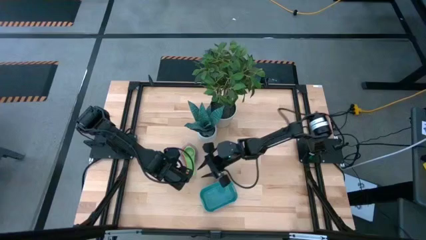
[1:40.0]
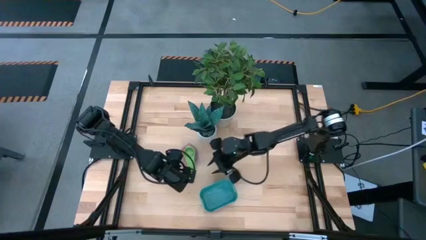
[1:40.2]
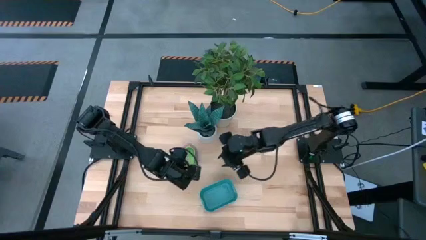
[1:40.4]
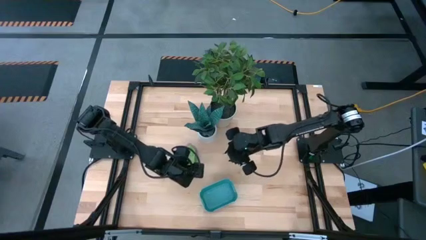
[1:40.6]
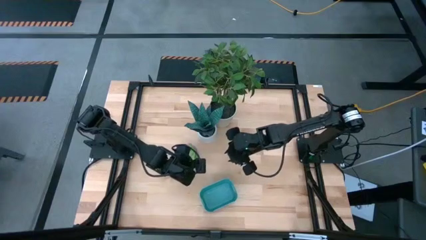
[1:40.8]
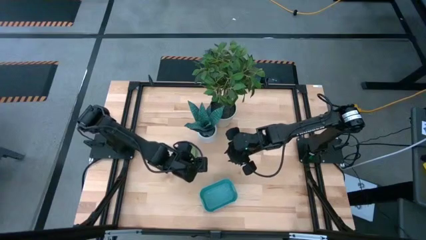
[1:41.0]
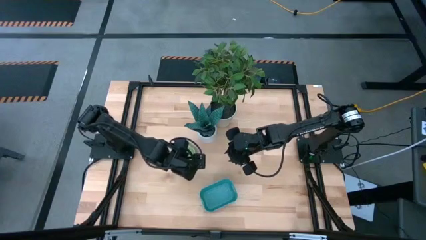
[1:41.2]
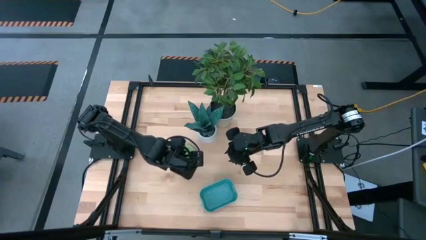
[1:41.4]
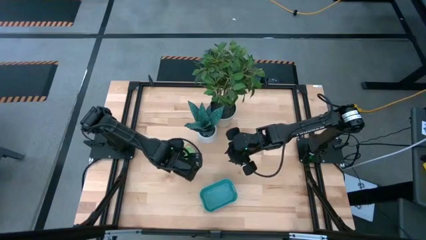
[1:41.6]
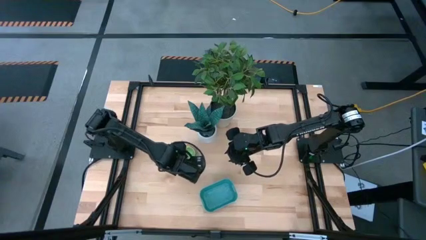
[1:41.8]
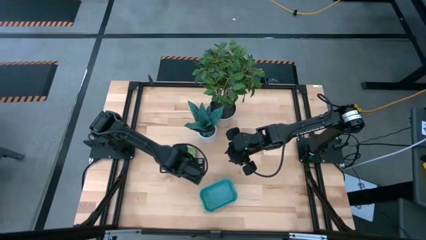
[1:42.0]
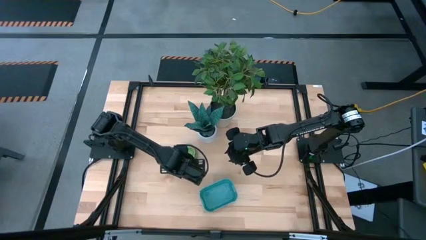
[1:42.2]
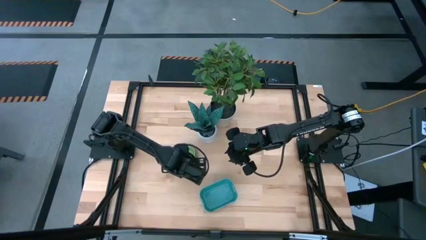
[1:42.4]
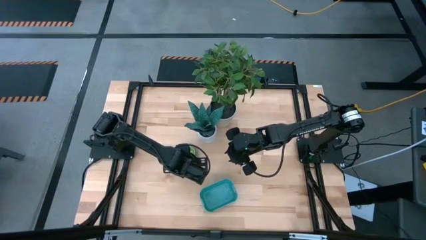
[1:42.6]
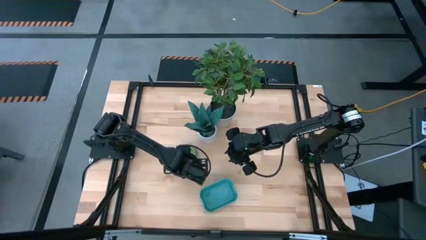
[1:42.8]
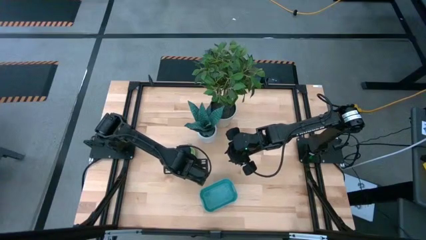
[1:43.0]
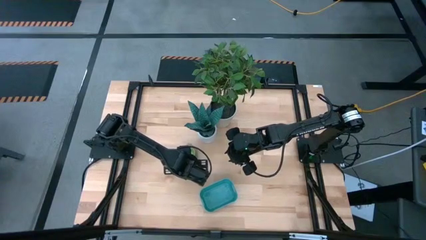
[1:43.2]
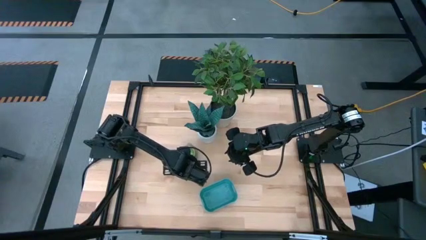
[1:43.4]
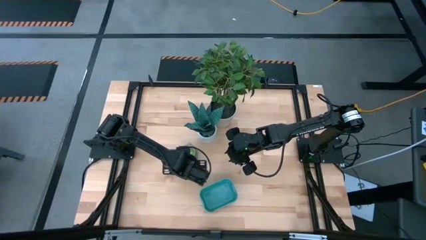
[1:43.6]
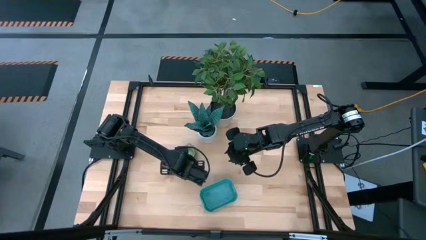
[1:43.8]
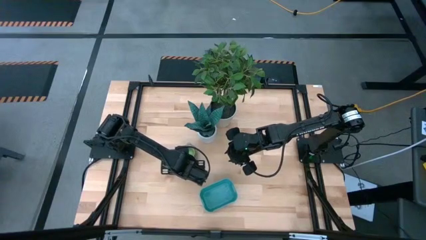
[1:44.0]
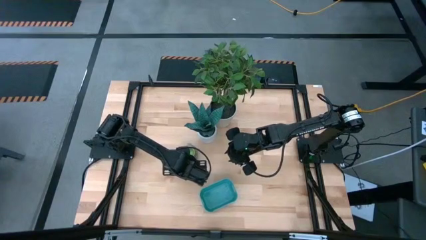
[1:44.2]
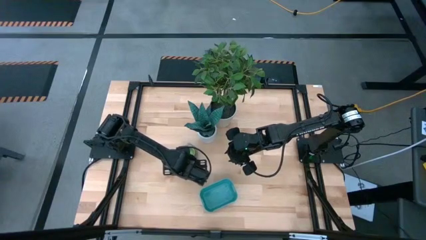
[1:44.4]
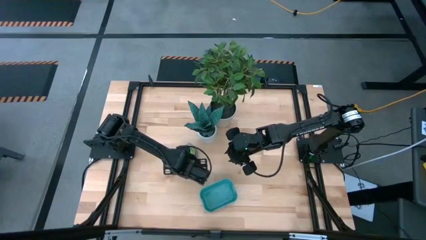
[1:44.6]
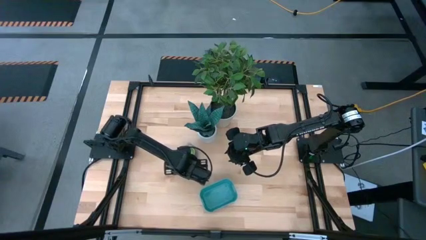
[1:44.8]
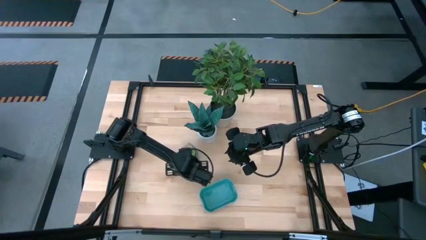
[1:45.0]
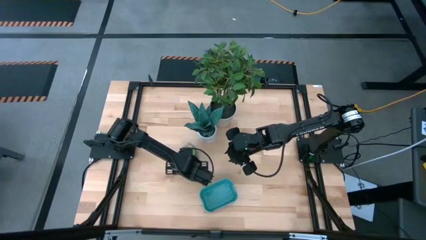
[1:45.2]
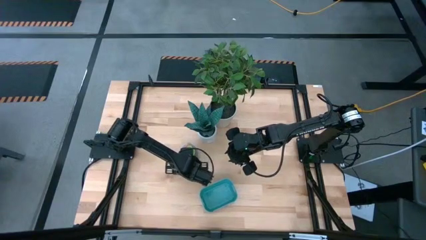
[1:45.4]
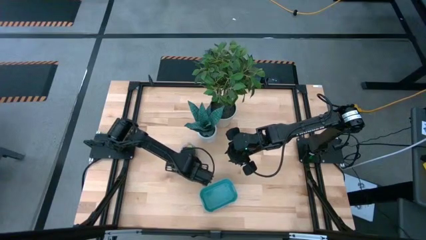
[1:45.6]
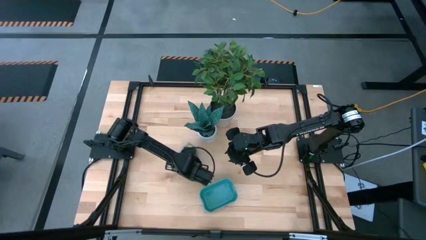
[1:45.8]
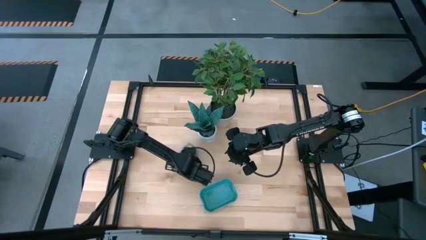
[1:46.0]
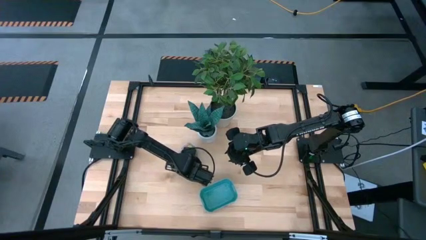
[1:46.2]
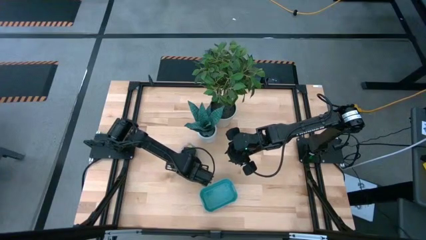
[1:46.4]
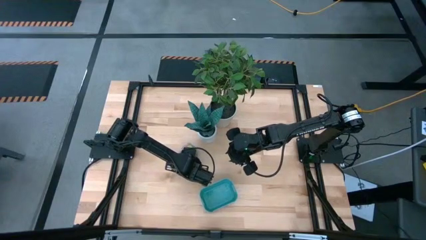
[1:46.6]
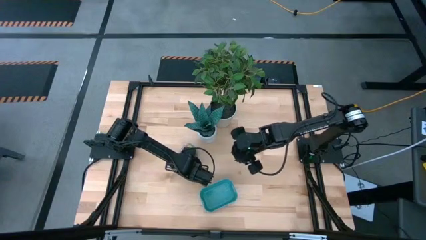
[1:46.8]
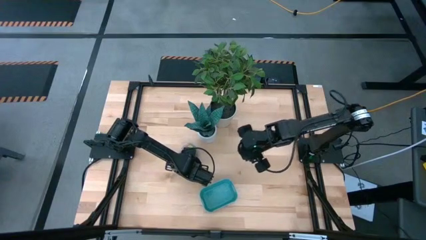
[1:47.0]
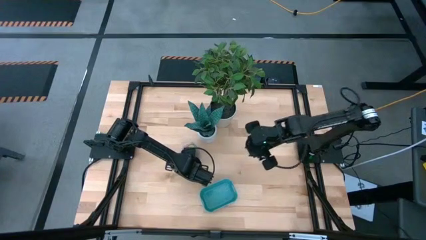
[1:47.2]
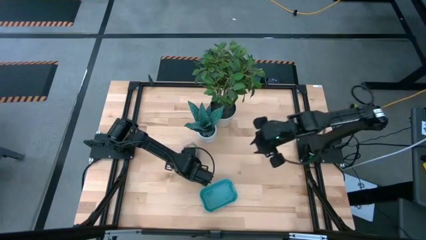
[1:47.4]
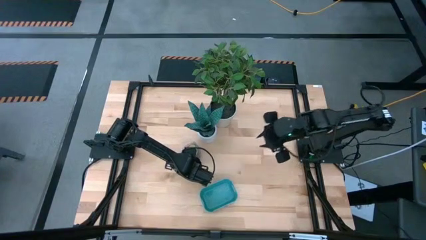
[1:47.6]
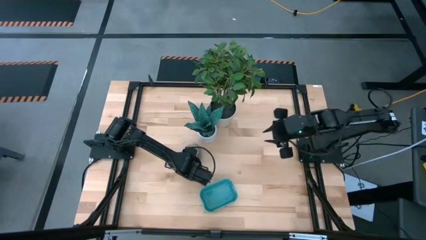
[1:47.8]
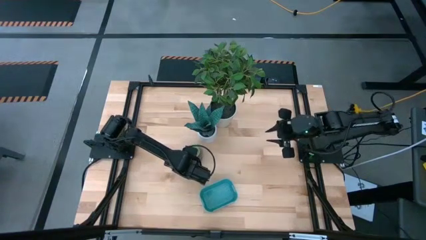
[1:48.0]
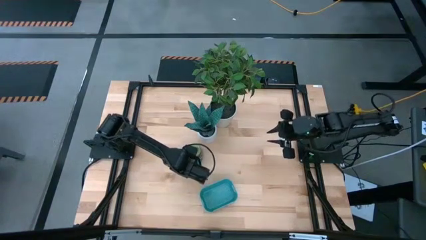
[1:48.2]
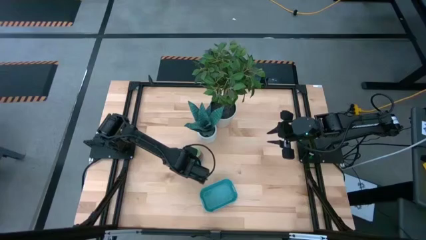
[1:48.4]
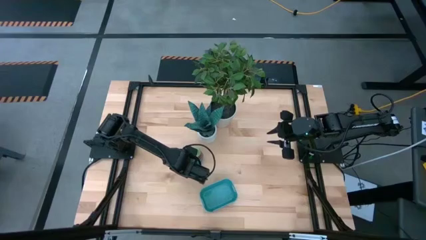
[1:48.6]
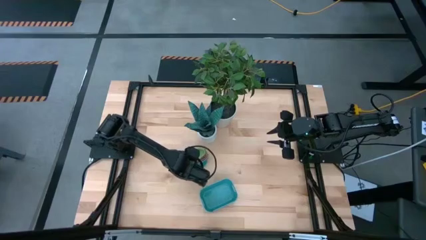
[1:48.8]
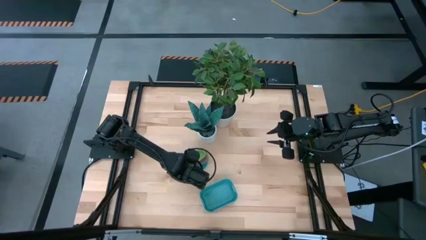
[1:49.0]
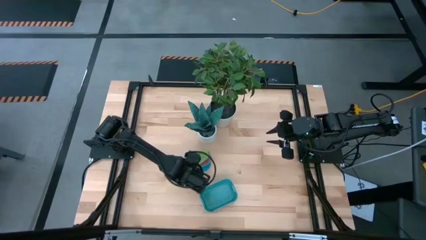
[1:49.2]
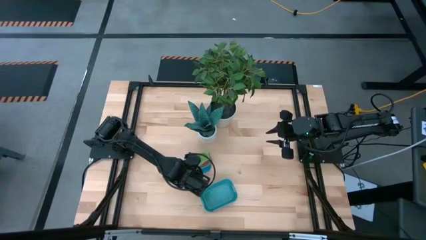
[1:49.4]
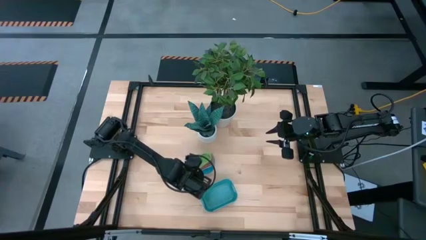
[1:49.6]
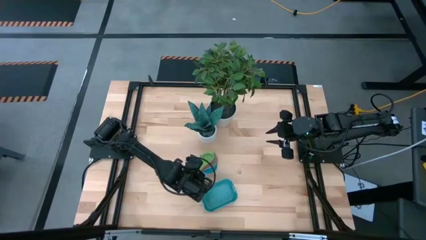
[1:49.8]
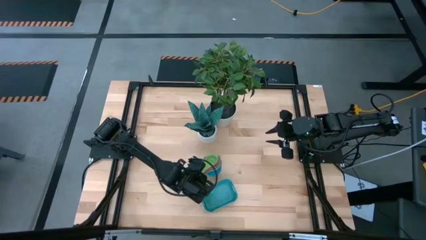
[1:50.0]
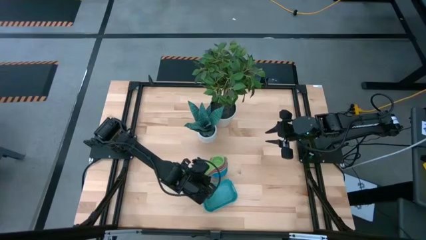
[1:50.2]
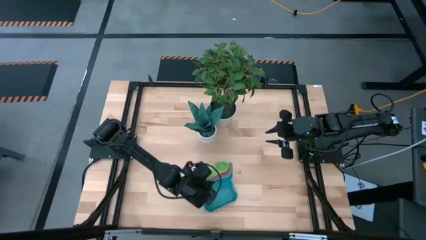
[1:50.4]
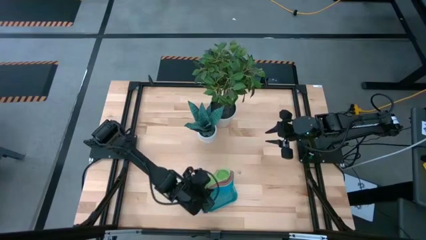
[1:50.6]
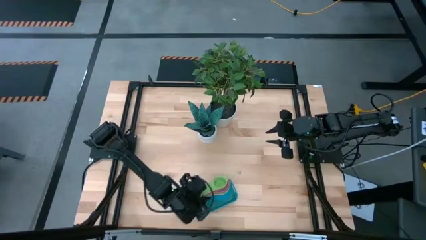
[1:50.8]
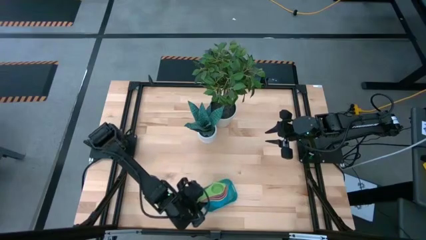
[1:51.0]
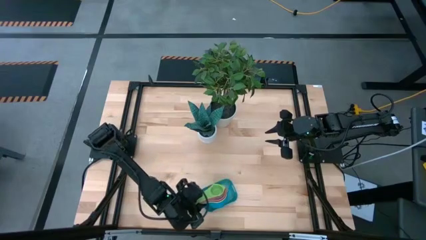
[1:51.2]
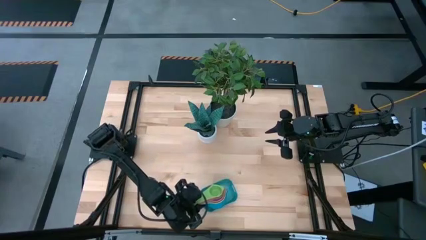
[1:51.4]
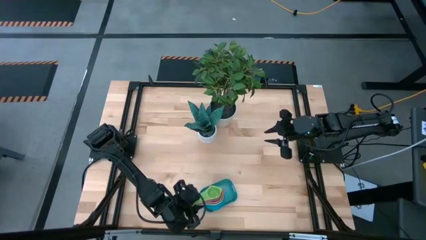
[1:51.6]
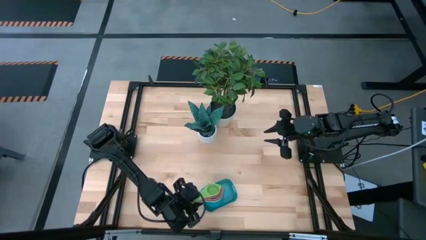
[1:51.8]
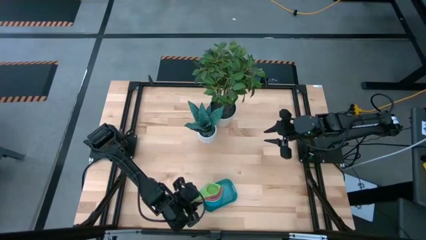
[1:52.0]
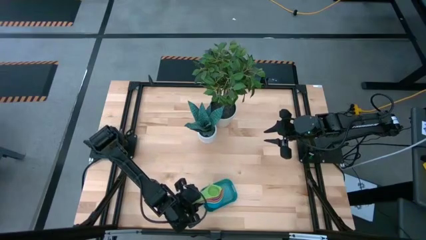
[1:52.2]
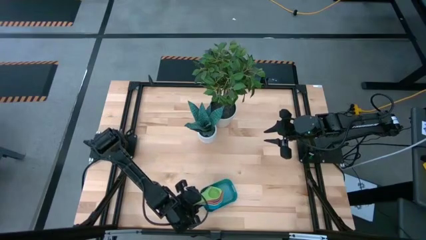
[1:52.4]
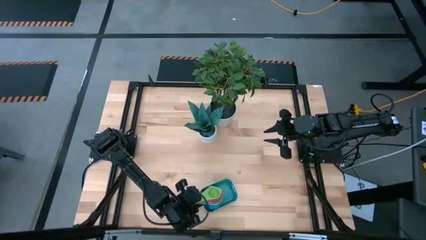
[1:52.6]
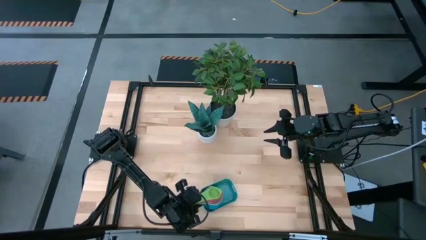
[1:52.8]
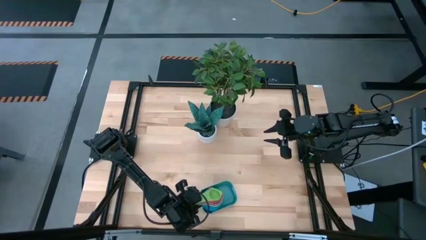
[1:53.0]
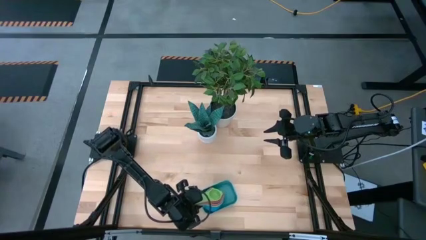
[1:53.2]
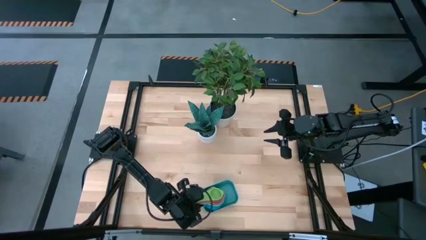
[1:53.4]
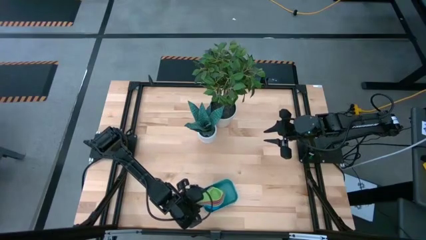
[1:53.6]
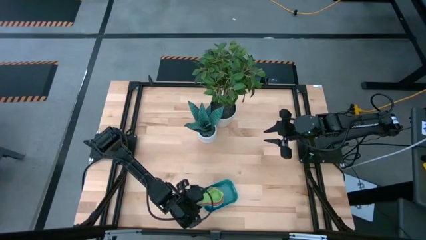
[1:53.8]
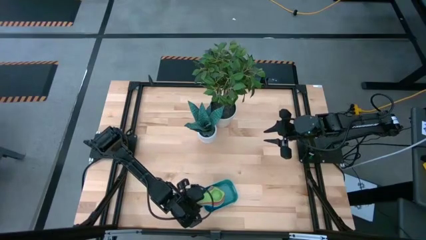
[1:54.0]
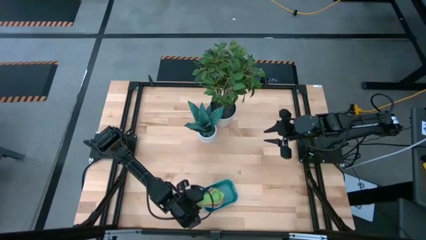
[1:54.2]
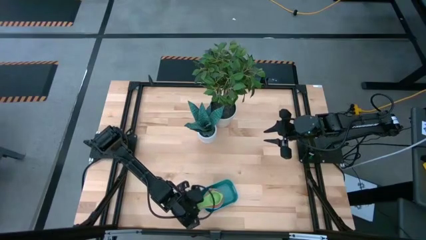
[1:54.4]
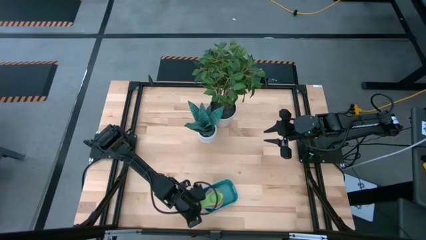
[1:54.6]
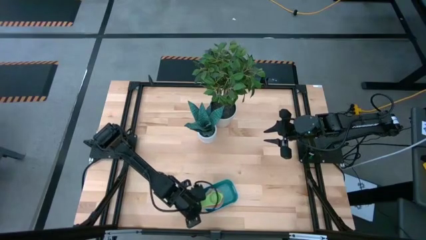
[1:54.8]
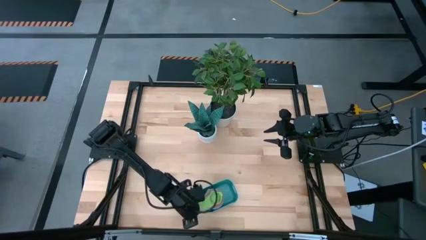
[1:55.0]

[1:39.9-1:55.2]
Task: Nest measuring cups in basket
Put the stacked measuring cups into the green bin
